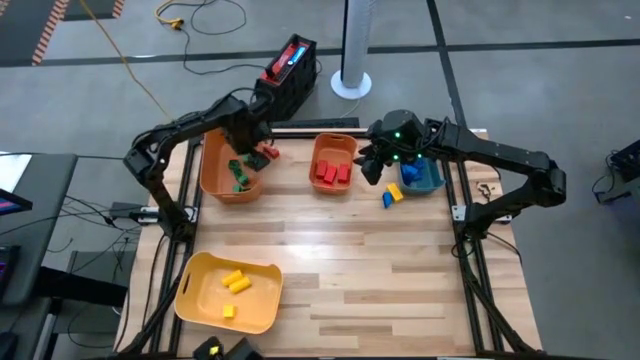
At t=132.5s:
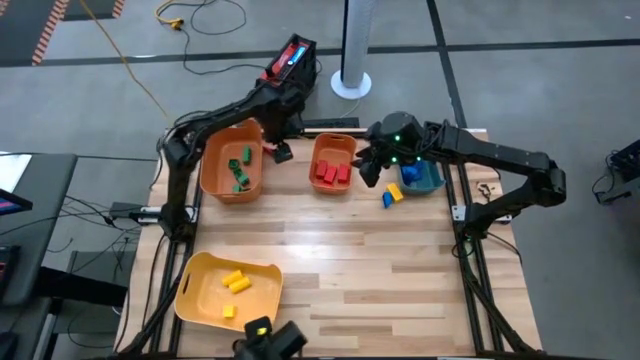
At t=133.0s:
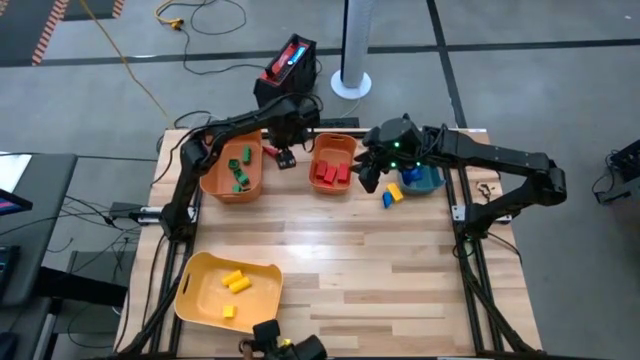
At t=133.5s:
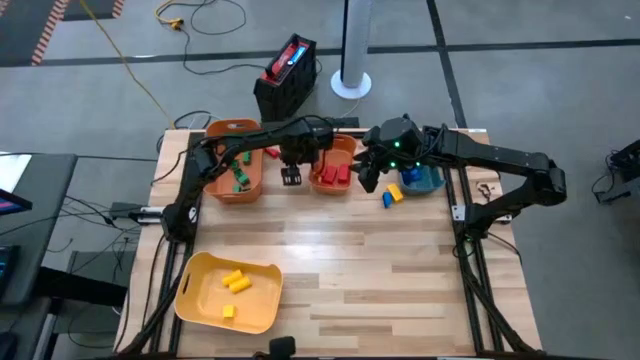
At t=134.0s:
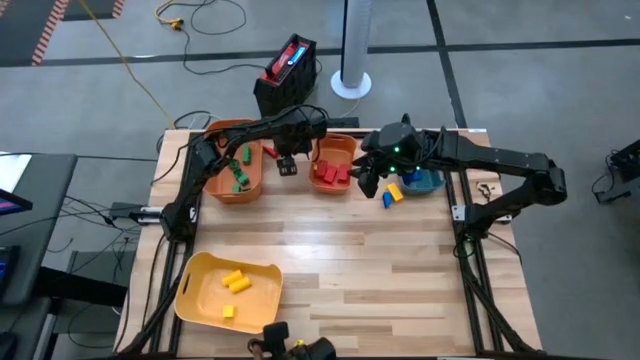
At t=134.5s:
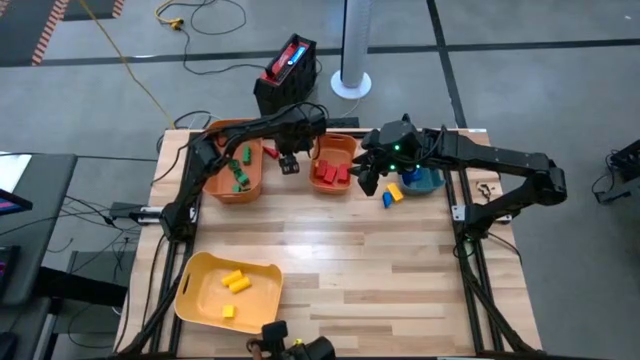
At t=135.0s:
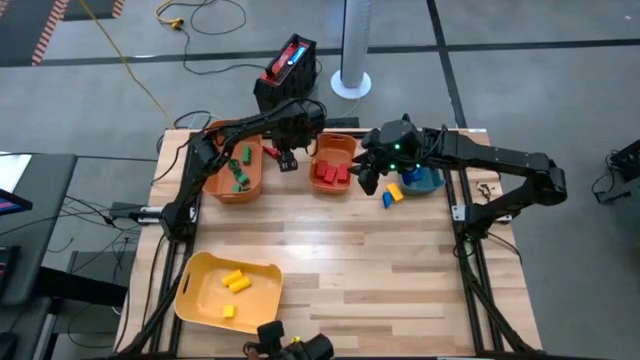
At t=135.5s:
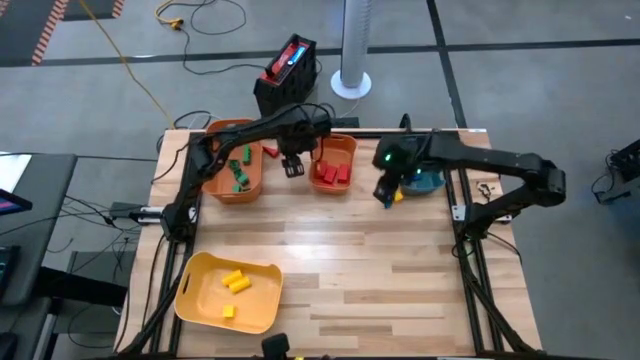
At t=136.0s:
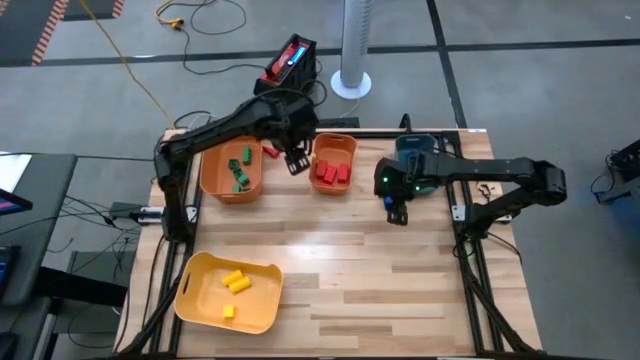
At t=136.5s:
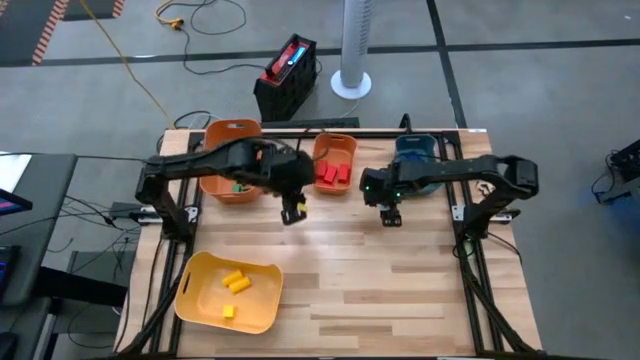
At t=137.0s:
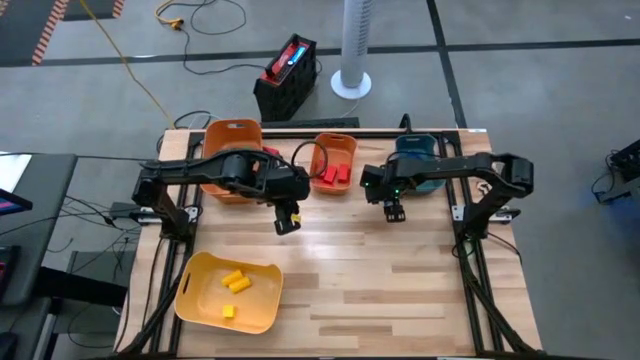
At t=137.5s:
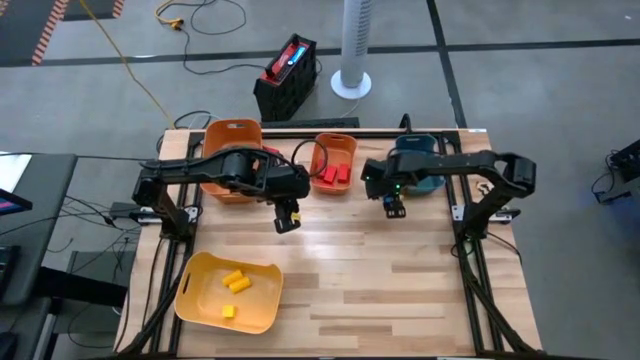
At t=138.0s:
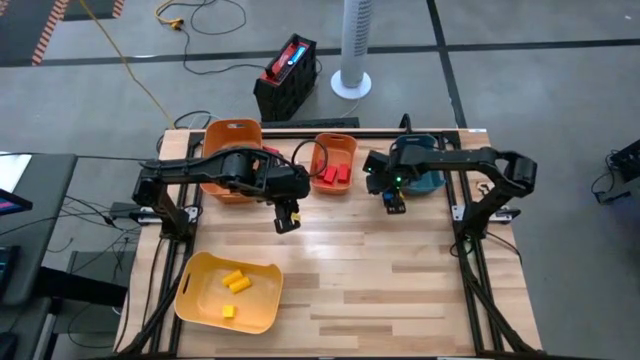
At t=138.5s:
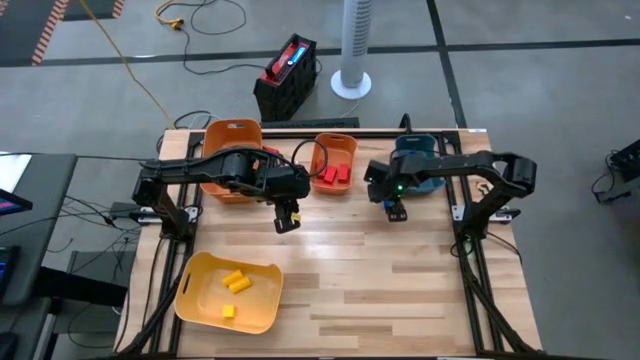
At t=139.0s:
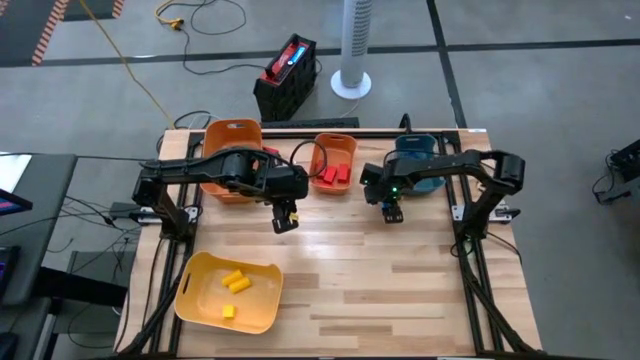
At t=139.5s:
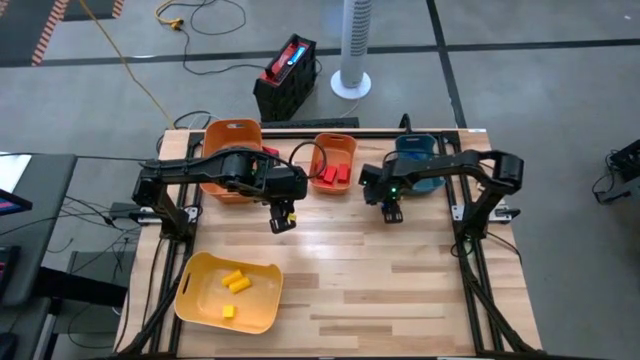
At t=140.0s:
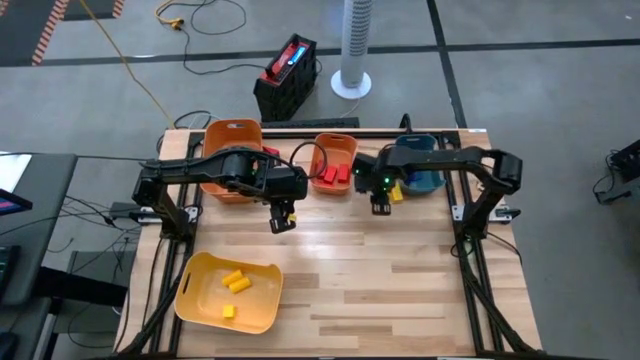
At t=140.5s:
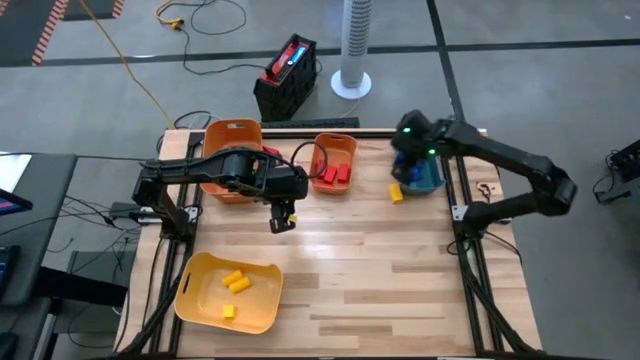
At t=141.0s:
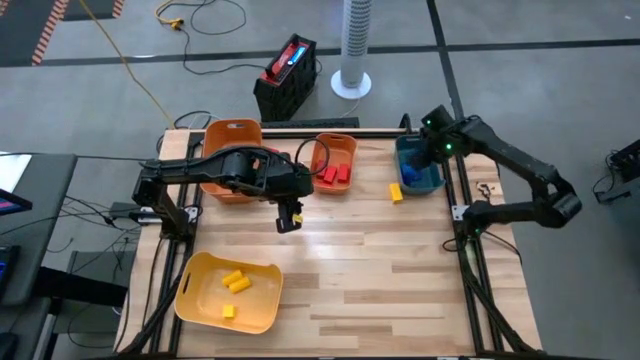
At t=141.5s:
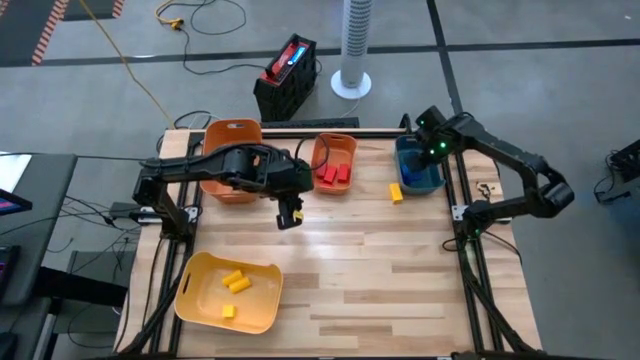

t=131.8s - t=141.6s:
Task: Sort blocks
Put the blue game piece into the green bin

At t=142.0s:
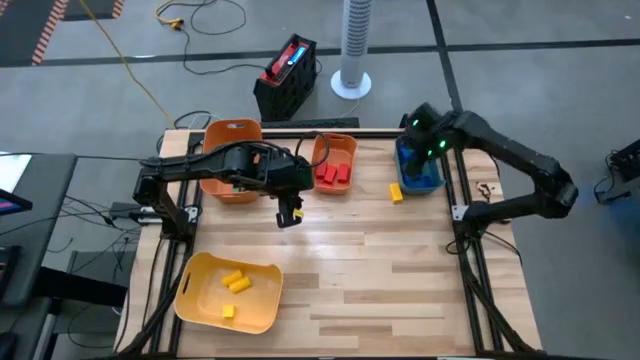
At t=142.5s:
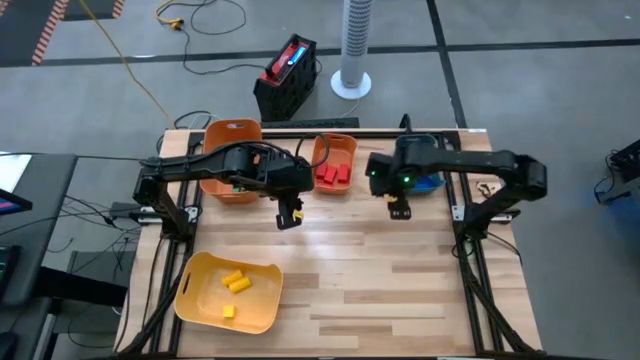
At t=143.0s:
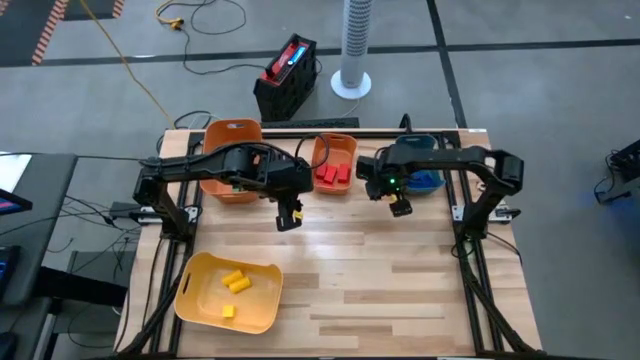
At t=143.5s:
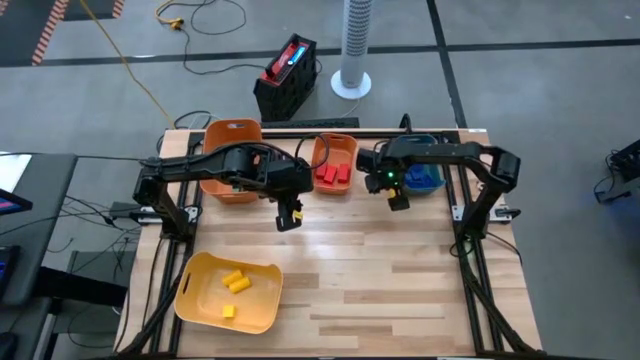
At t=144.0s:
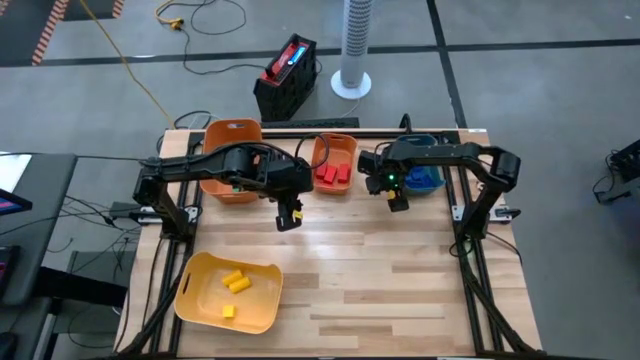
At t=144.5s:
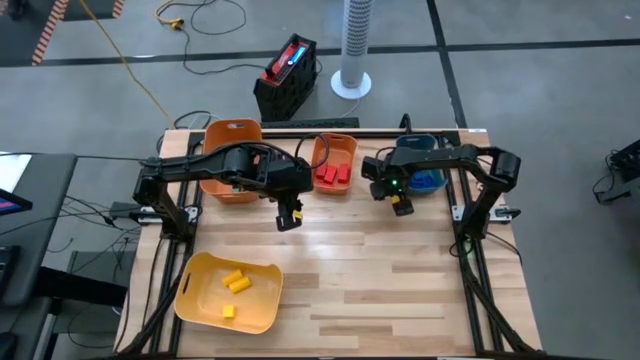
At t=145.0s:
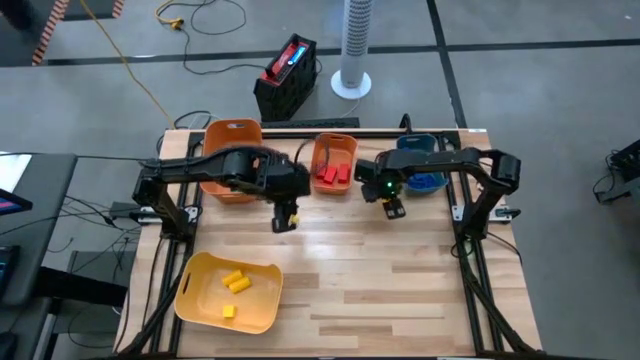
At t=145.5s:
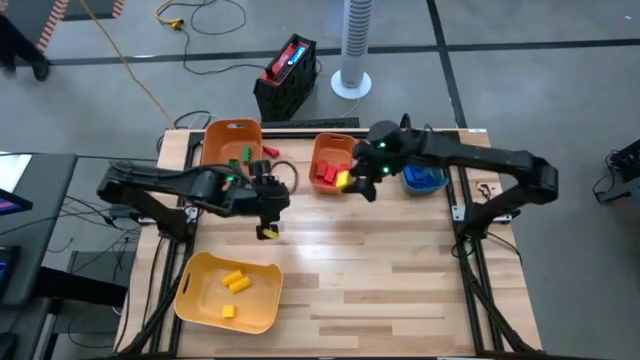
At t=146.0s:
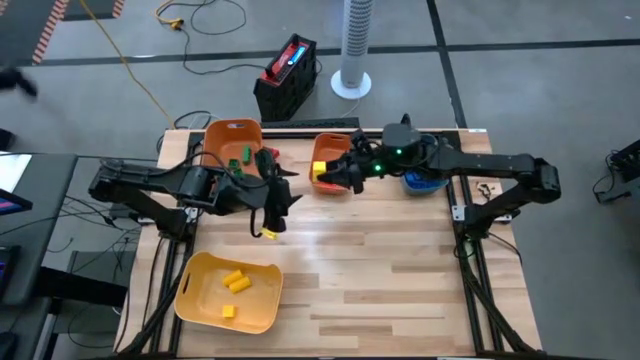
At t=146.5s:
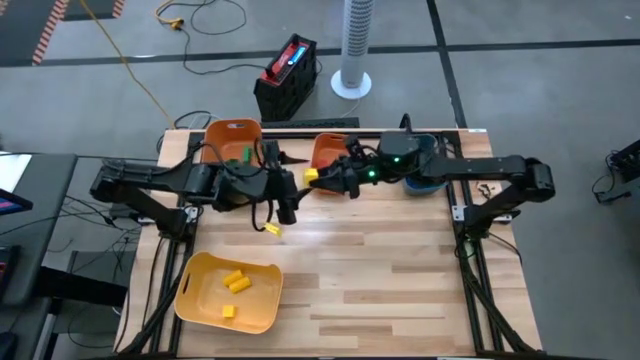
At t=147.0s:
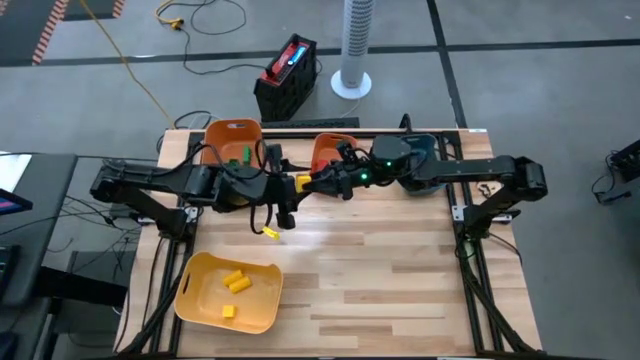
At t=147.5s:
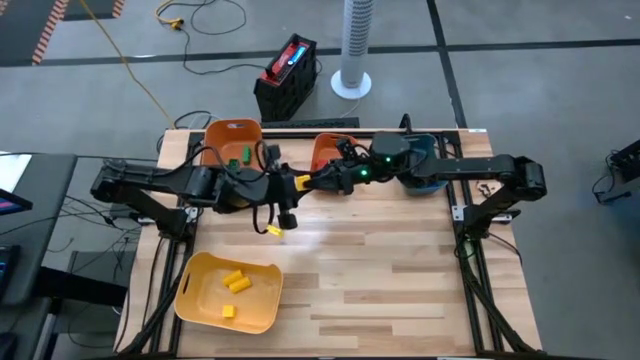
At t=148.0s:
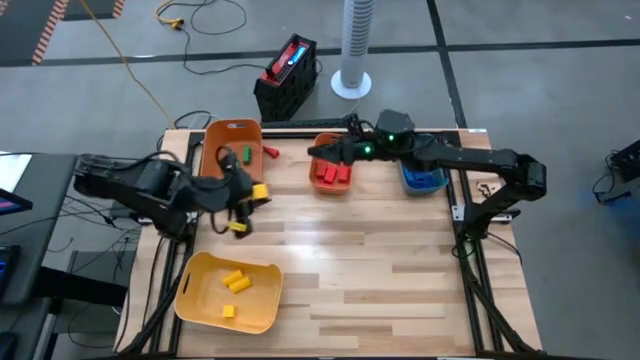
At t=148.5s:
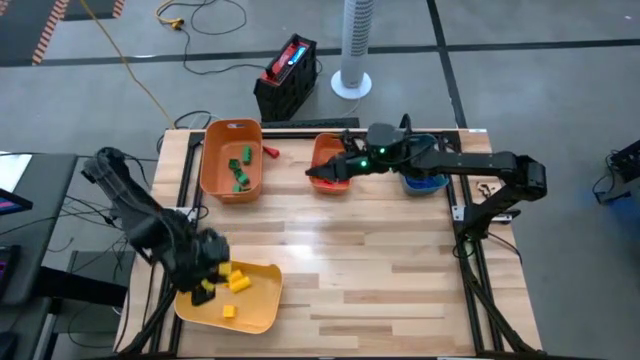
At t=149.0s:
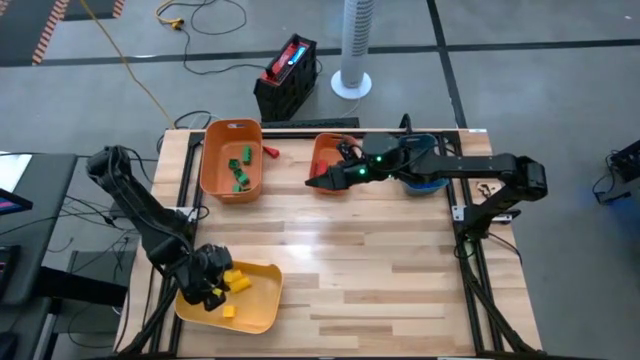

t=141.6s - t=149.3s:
Put the yellow block into the yellow bin

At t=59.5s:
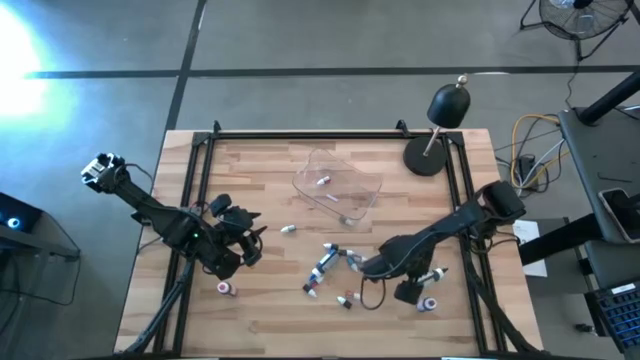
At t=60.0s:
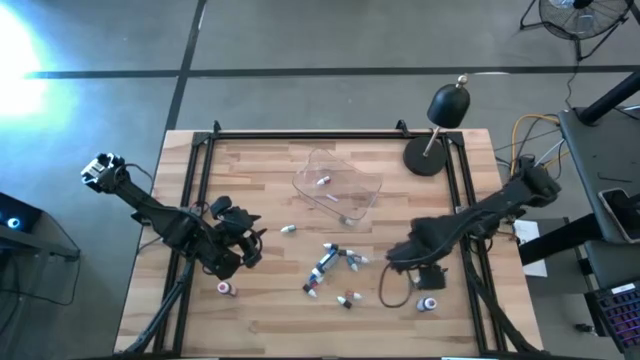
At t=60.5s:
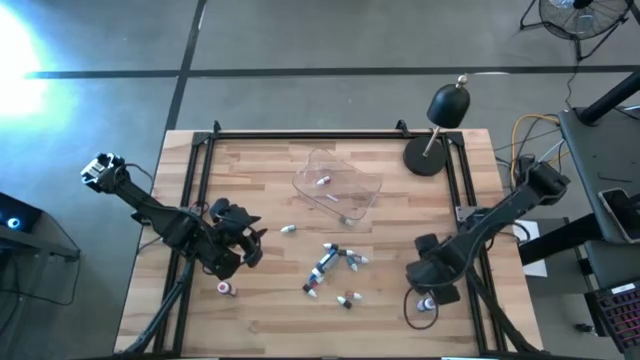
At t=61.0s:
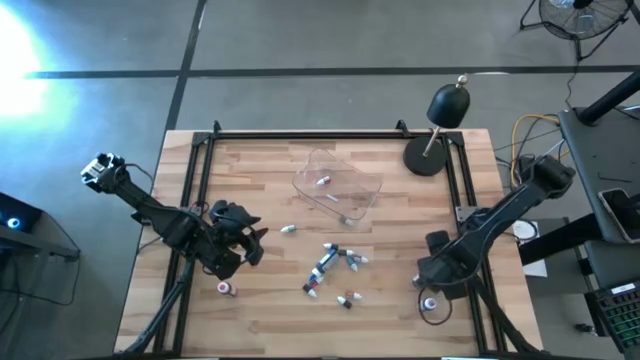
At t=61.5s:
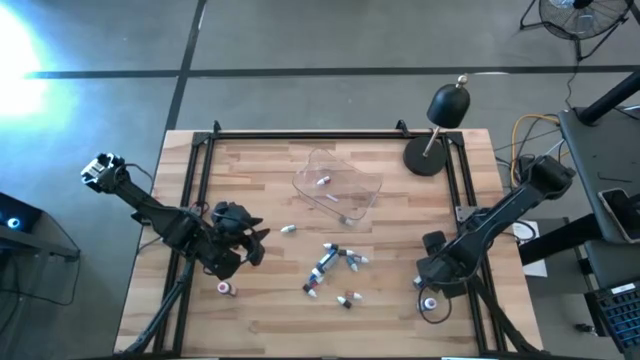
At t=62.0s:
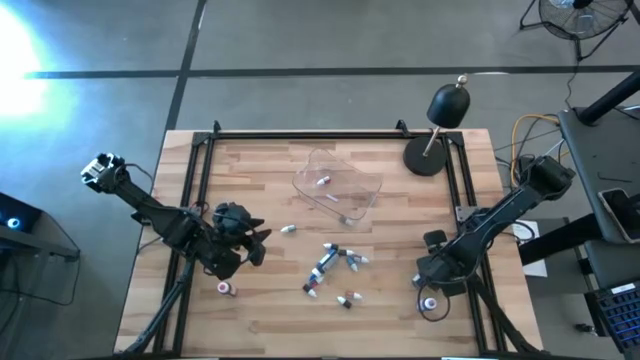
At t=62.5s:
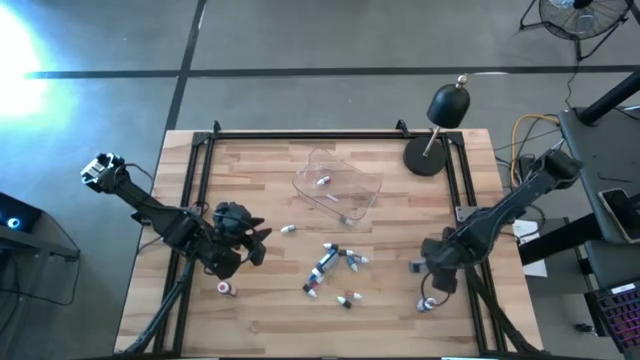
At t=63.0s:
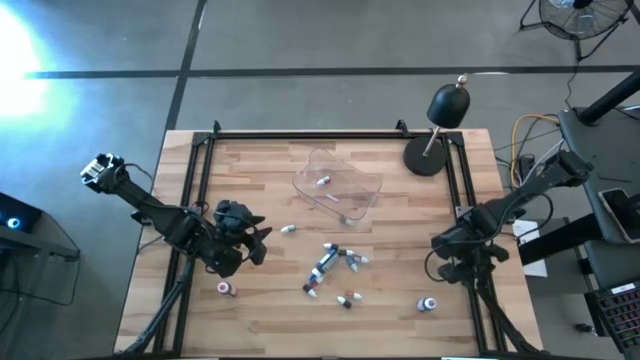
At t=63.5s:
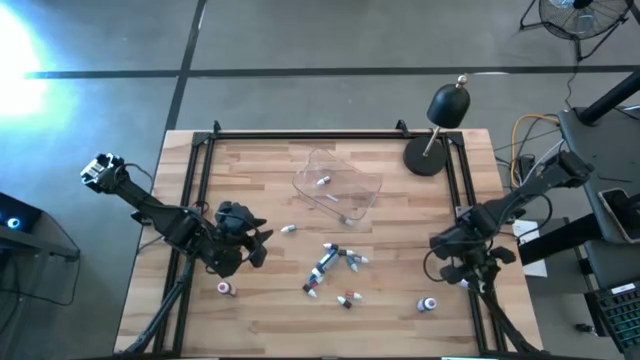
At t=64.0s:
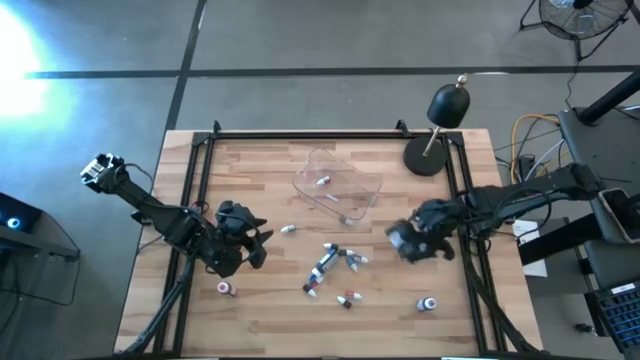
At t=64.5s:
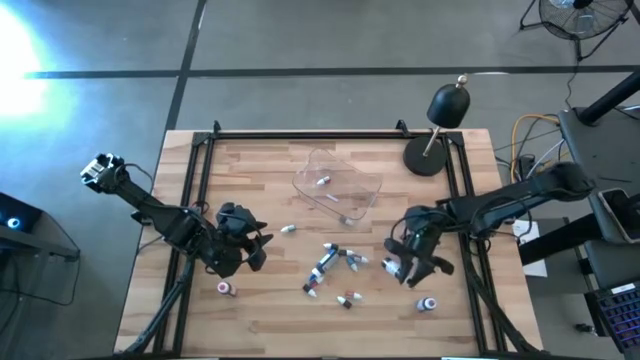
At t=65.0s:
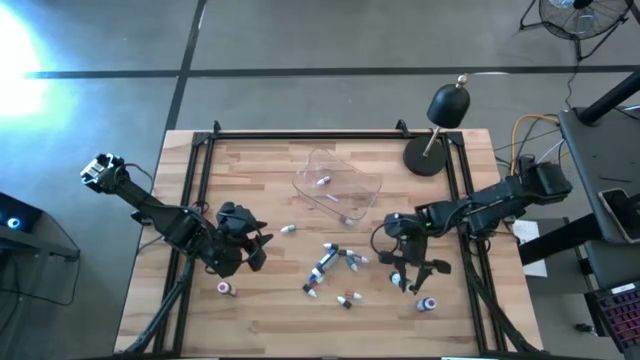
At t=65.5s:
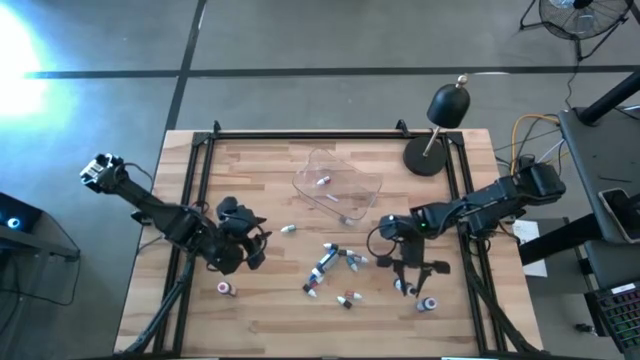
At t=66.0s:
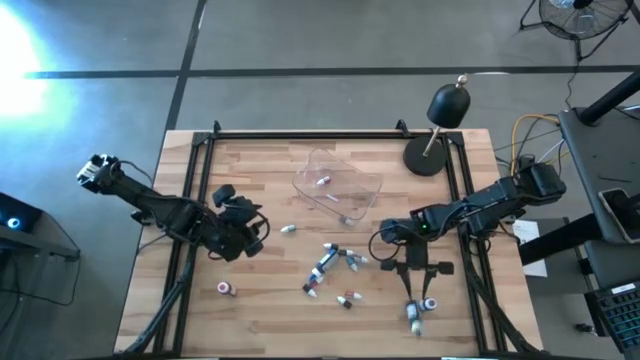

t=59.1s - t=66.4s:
Task: Pick & Place food coloring
Adjust the large black food coloring bottle
